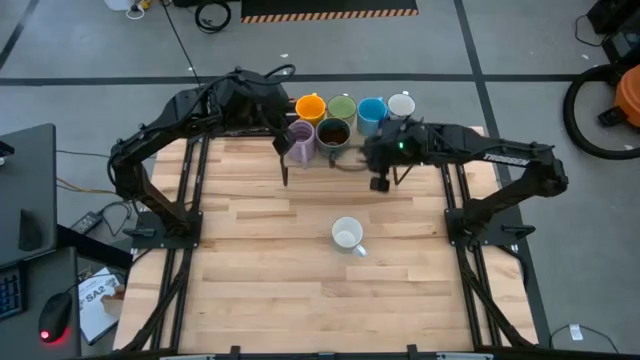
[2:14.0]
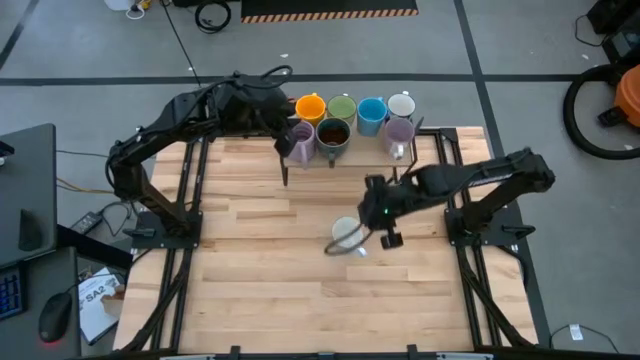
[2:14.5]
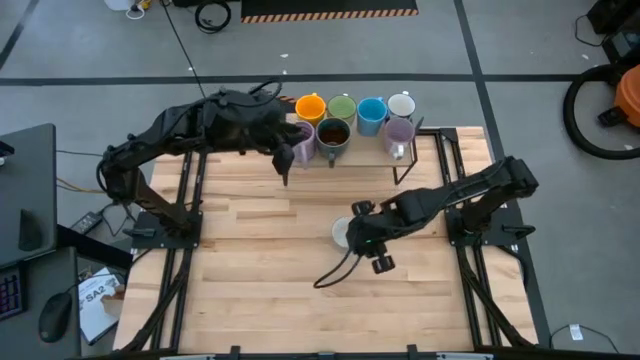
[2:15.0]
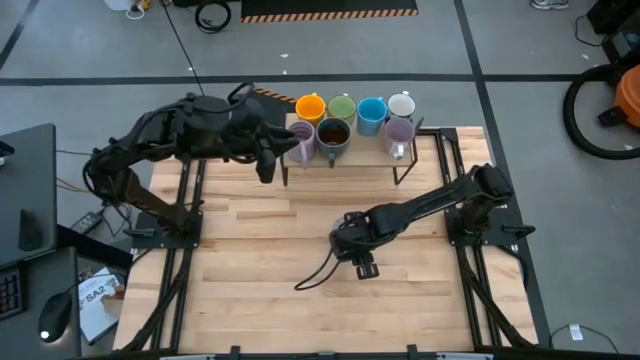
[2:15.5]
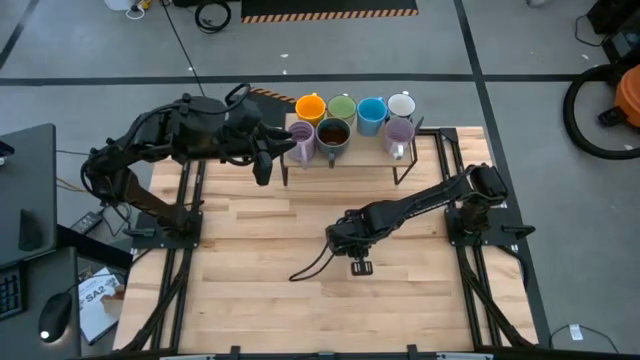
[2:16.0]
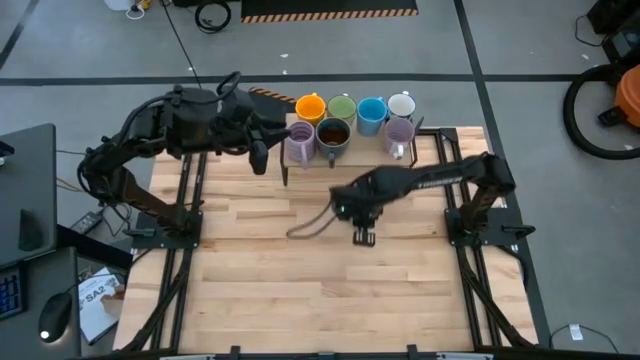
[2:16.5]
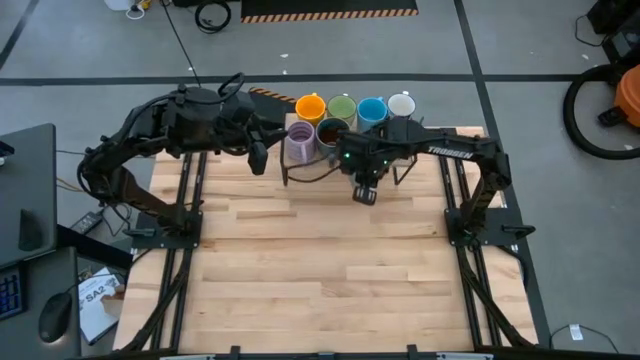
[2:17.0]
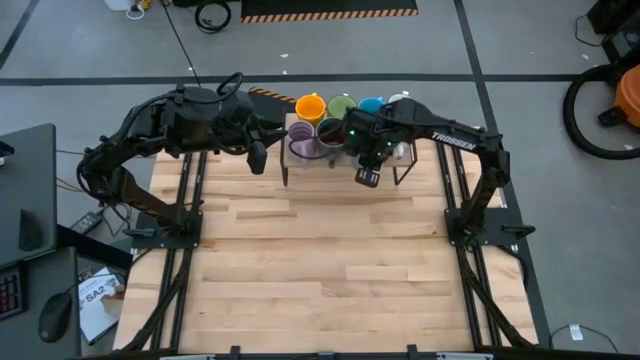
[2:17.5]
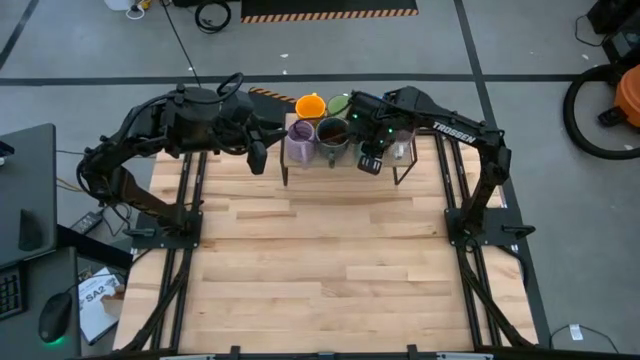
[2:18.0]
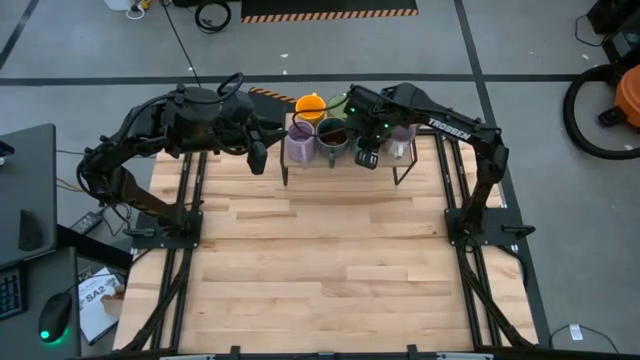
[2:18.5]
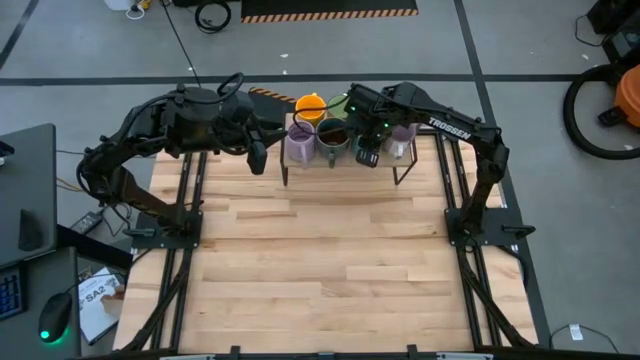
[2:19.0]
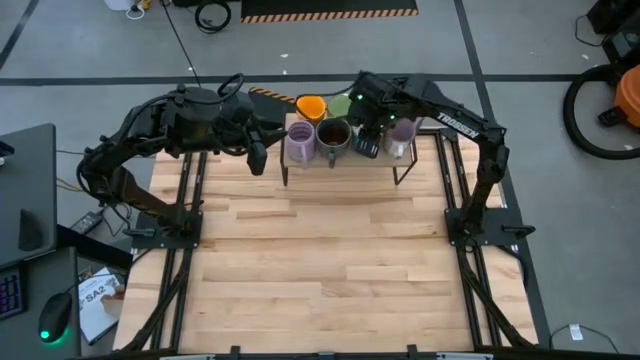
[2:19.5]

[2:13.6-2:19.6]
Task: Place coffee mugs
Put the blue mug on the shelf

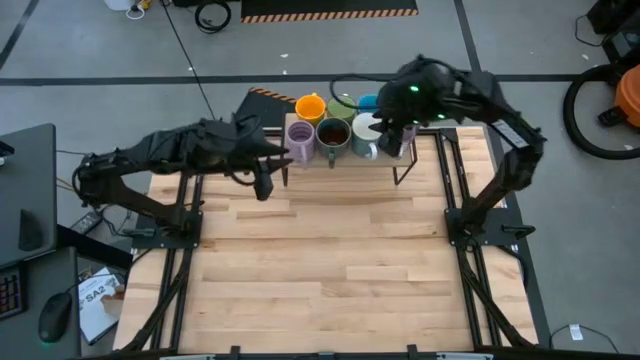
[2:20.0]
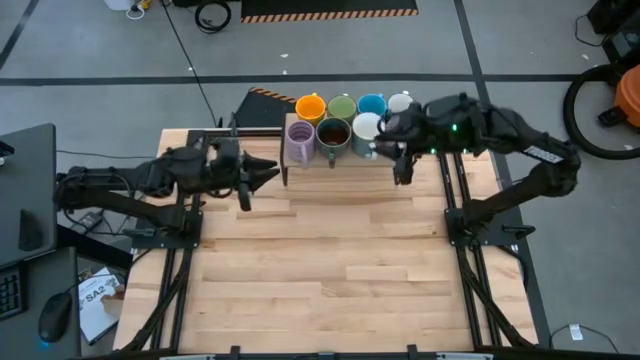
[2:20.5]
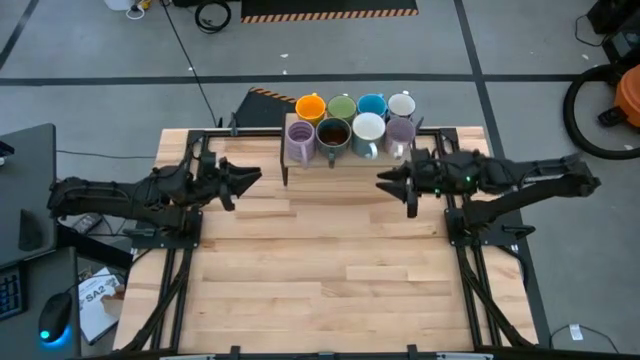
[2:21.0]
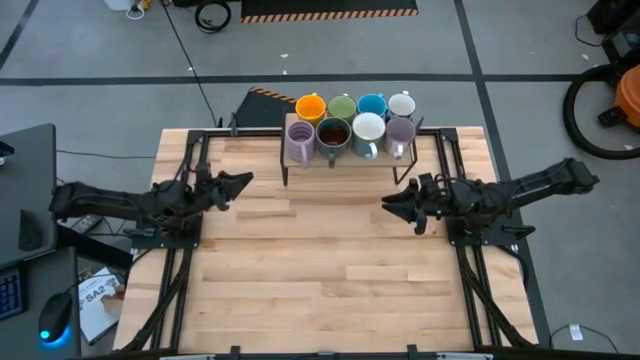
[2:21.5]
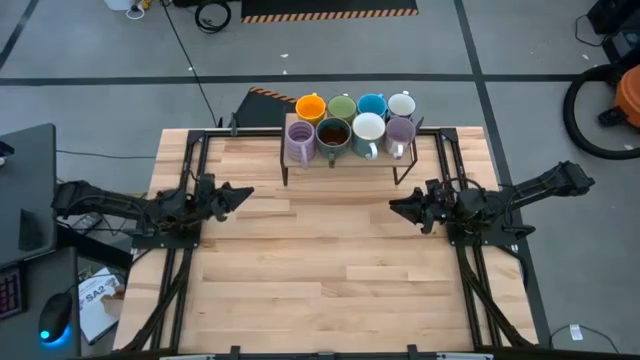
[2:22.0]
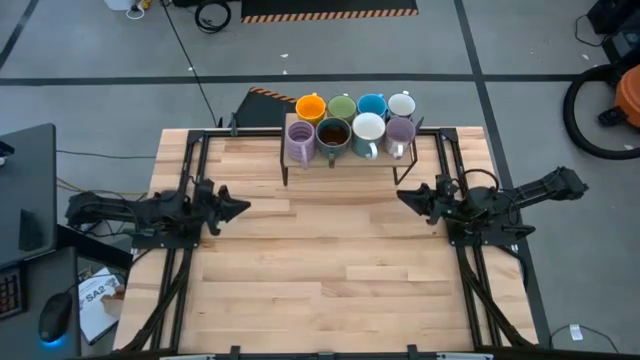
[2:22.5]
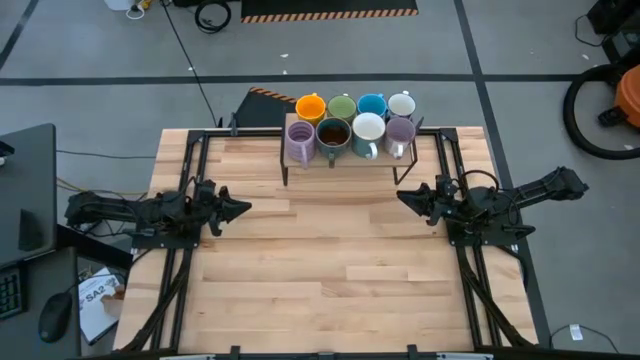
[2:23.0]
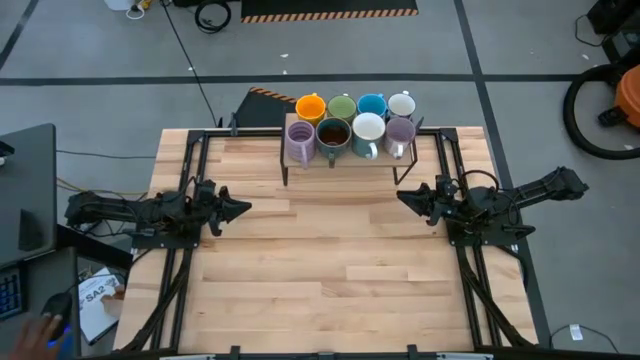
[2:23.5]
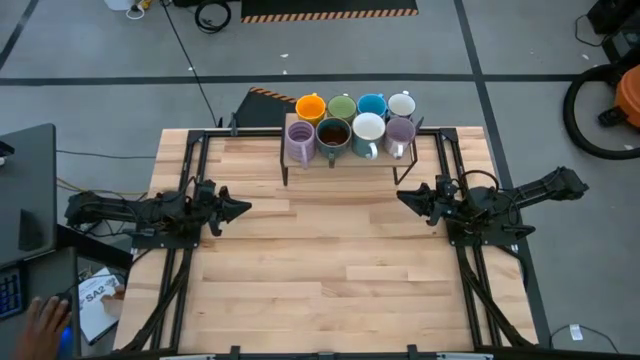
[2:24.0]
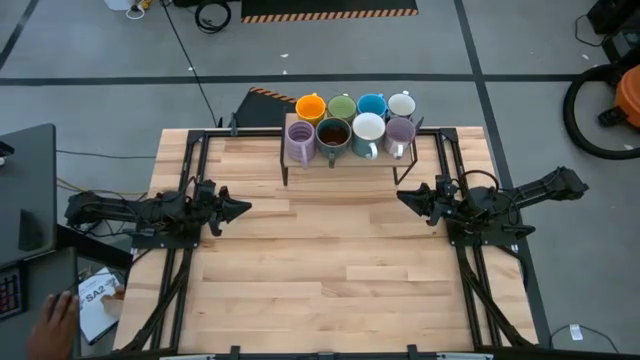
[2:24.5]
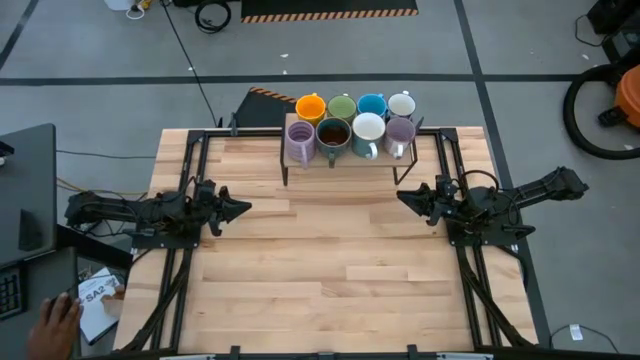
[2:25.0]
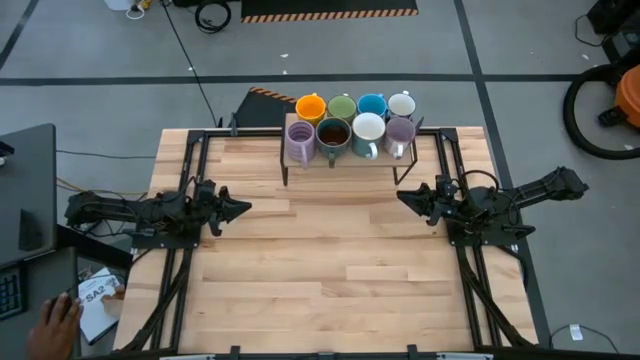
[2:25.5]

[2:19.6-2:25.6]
Return to Home Position

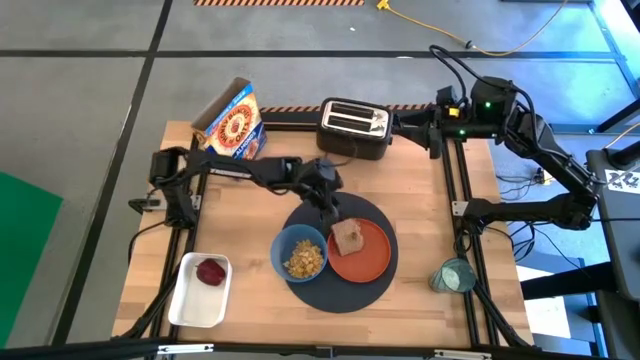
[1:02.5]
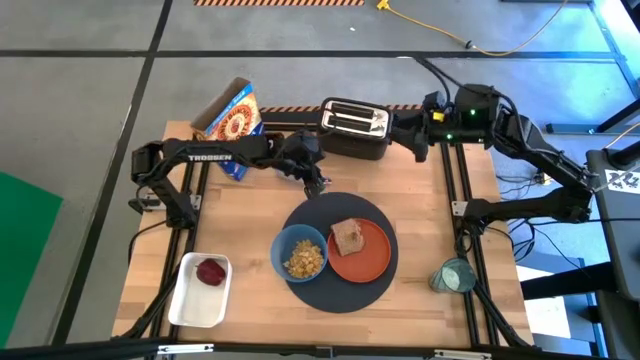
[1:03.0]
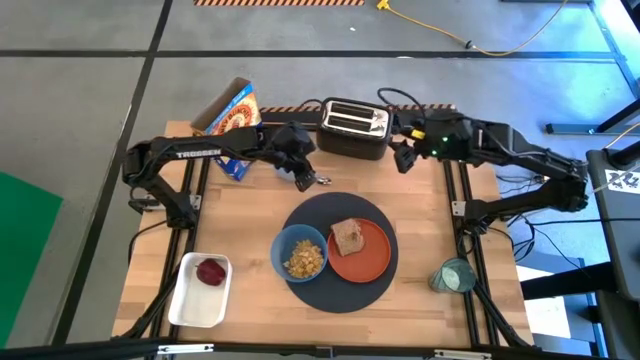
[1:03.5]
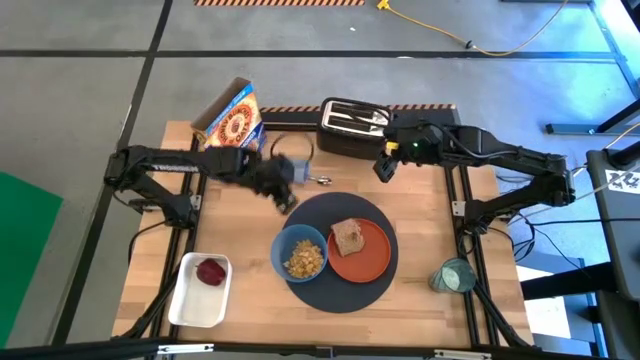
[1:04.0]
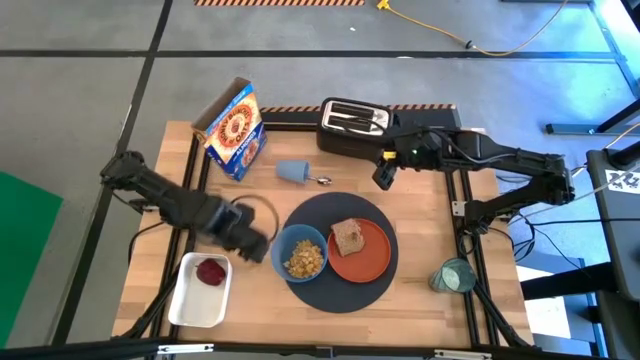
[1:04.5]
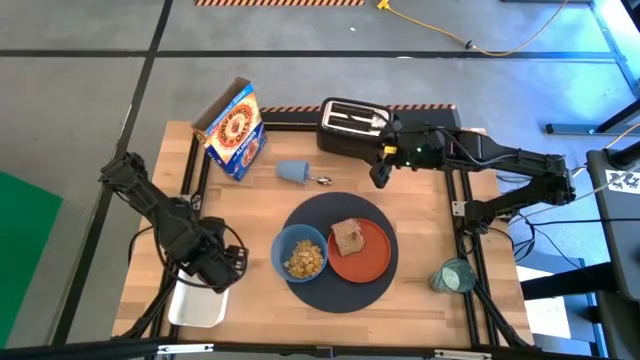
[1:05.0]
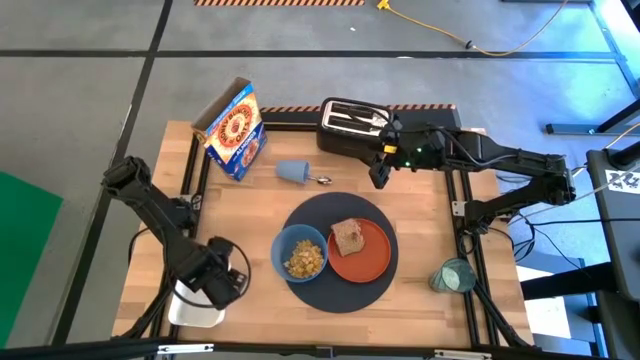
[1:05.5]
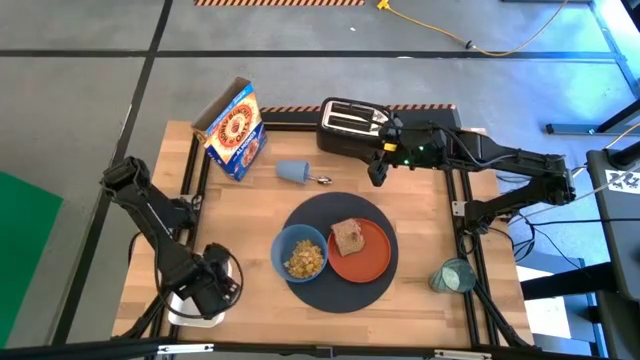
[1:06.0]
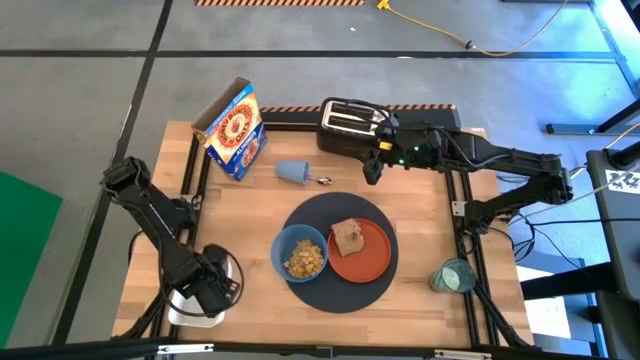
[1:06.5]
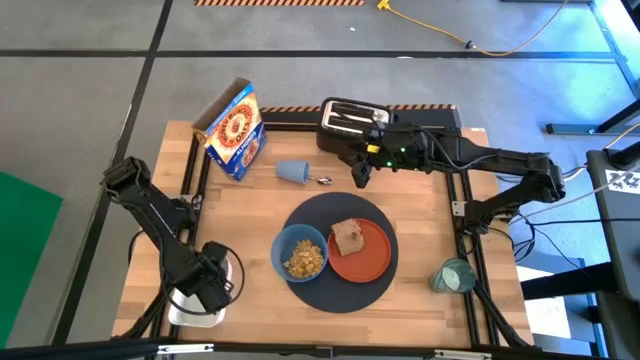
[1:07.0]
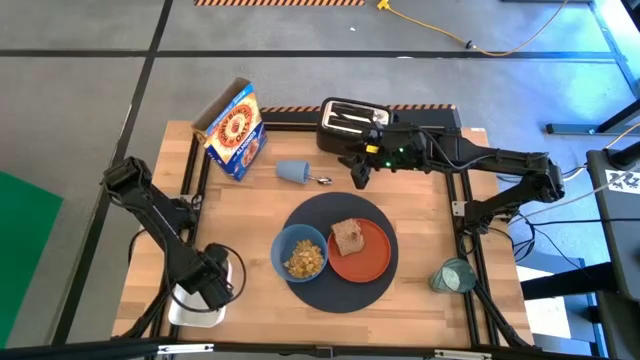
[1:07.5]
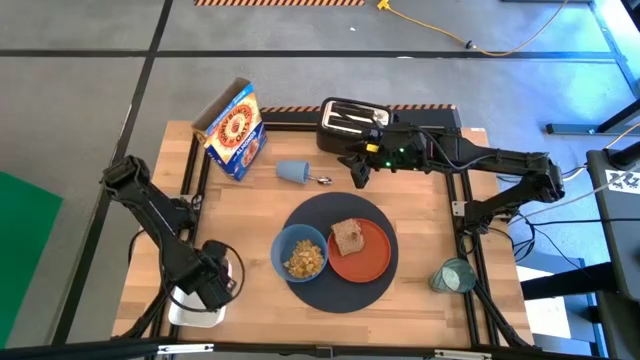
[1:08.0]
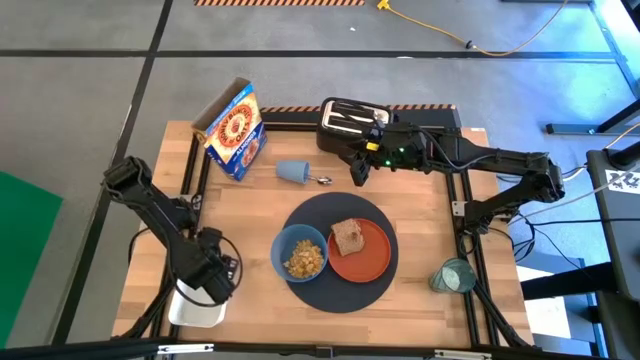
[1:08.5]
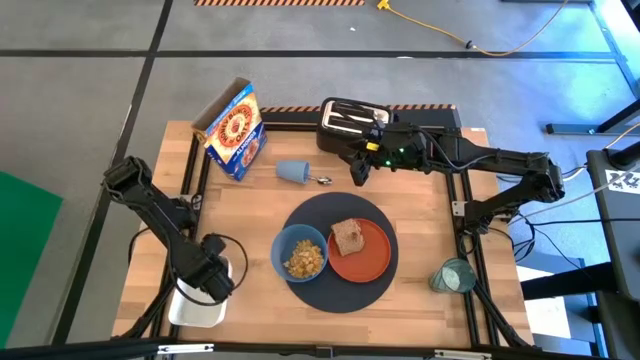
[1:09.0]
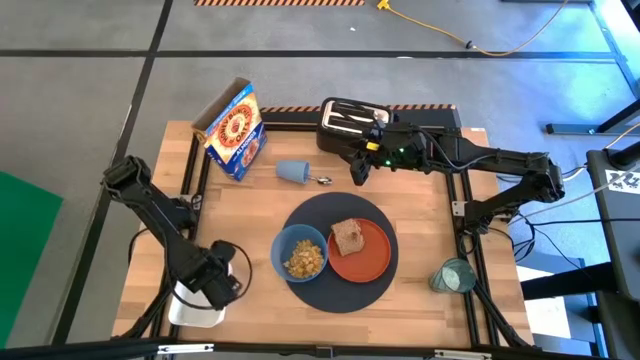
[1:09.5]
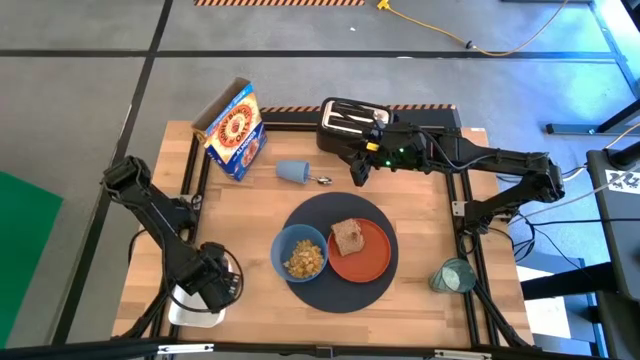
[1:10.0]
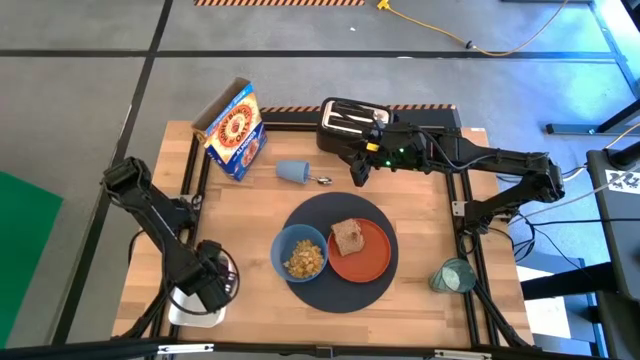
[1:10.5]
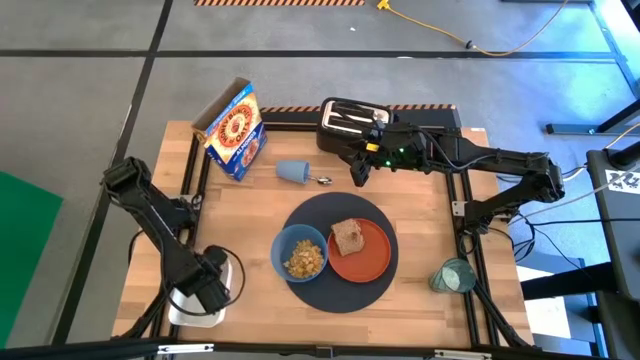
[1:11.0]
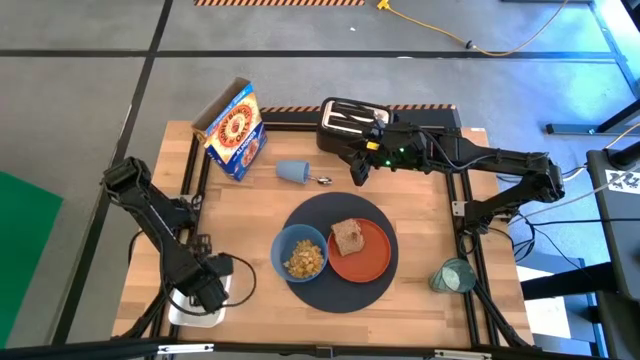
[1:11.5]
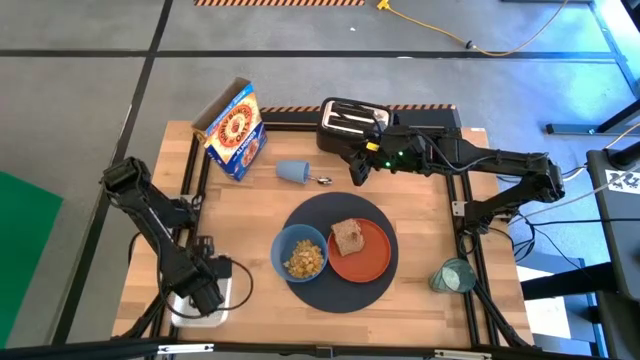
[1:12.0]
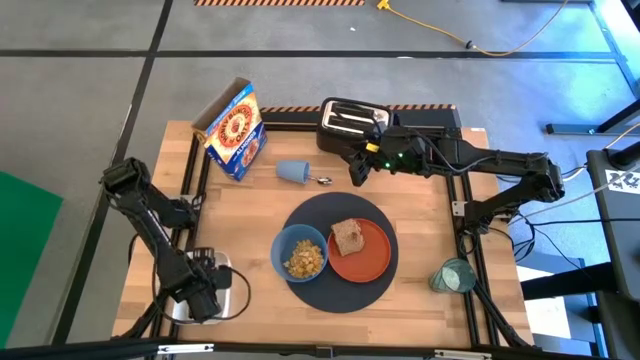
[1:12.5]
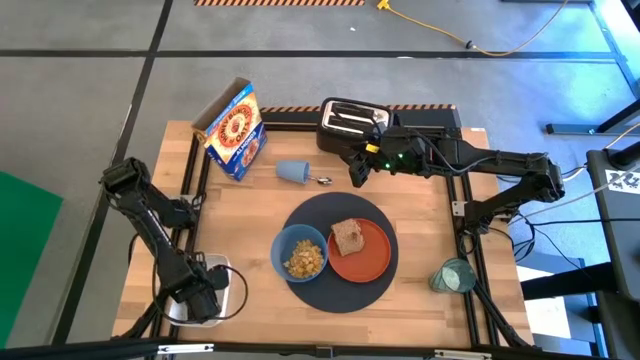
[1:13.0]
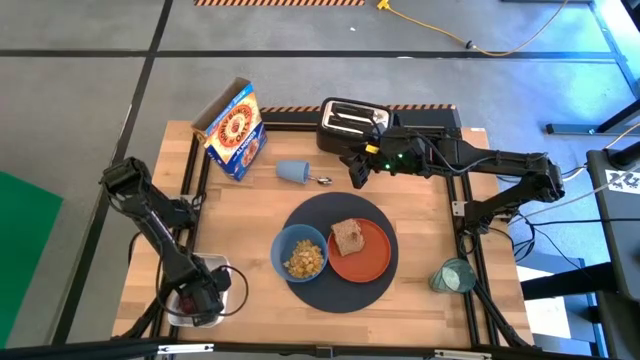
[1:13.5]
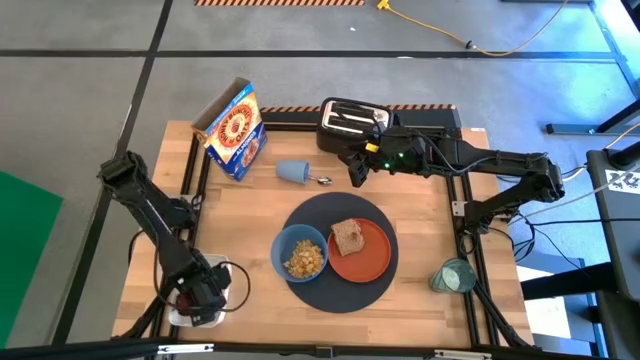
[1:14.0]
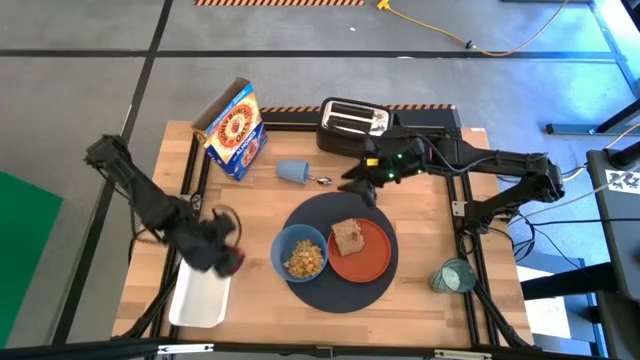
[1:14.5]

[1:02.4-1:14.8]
Task: Arrange a breakfast setting
Put the red apple from the white bin onto the orange plate
